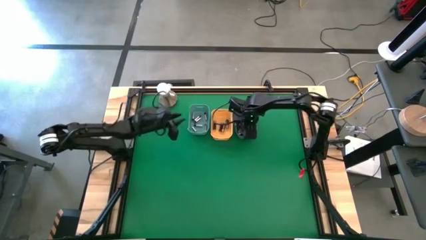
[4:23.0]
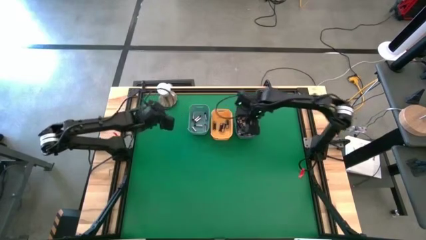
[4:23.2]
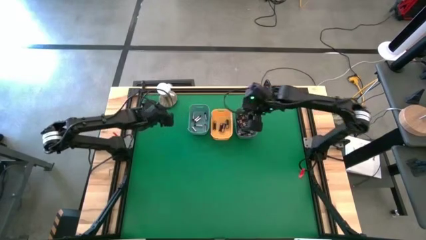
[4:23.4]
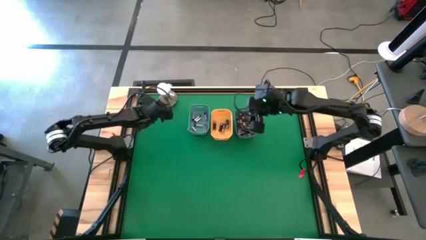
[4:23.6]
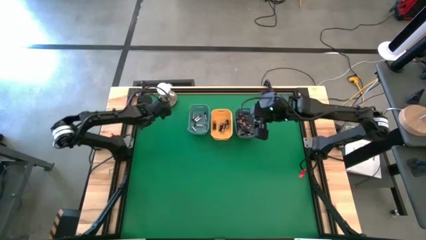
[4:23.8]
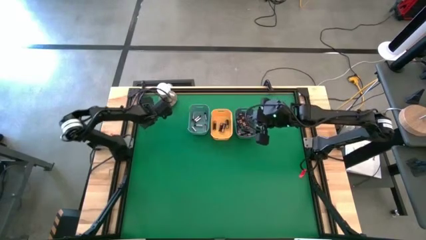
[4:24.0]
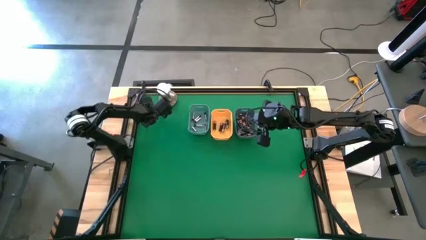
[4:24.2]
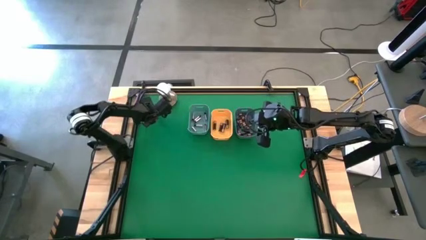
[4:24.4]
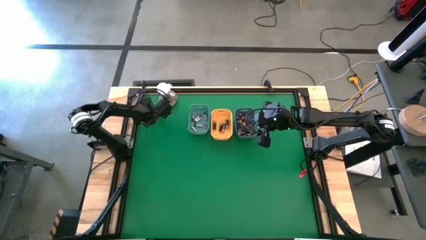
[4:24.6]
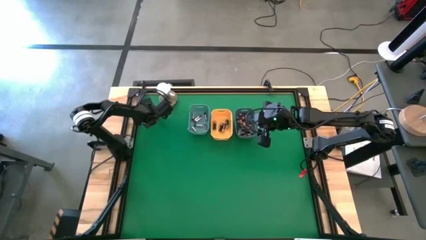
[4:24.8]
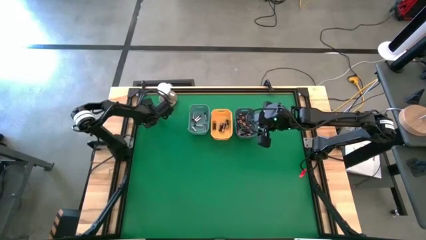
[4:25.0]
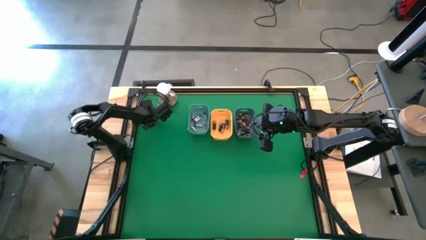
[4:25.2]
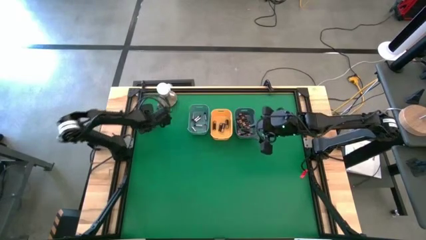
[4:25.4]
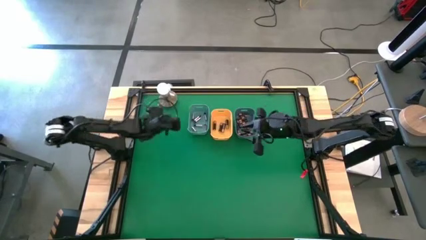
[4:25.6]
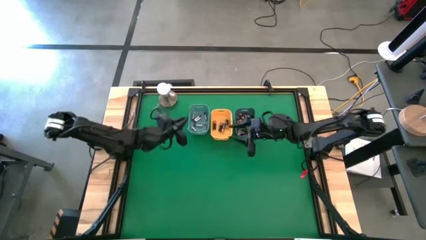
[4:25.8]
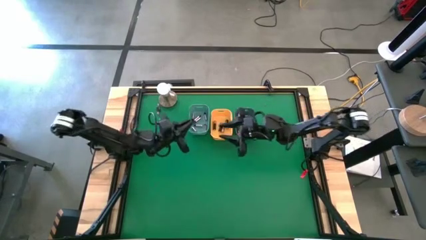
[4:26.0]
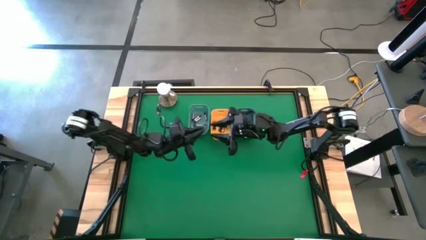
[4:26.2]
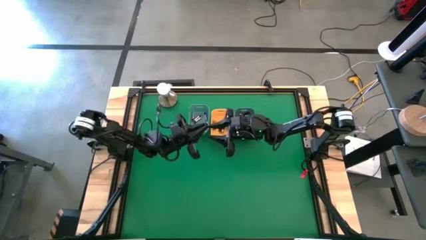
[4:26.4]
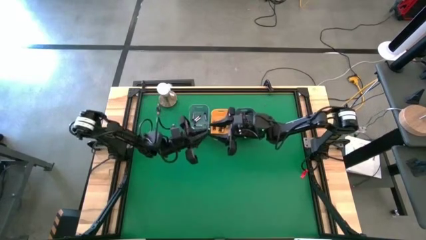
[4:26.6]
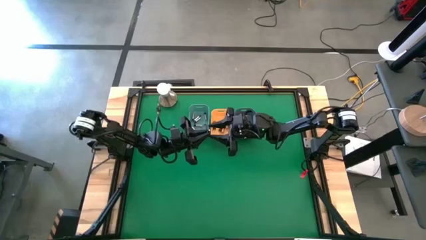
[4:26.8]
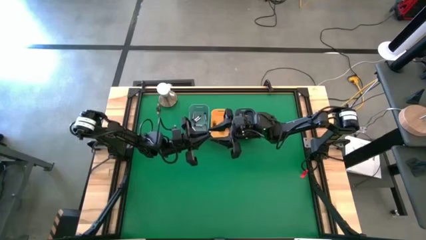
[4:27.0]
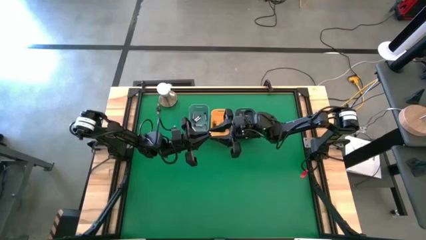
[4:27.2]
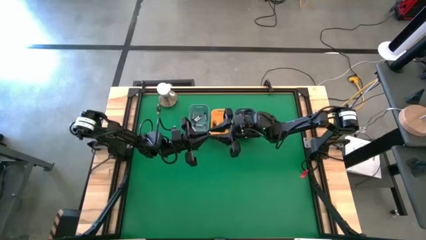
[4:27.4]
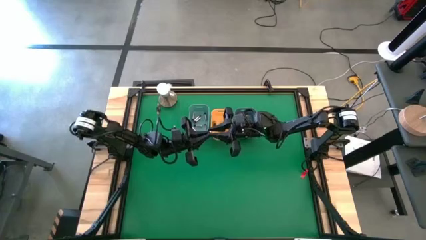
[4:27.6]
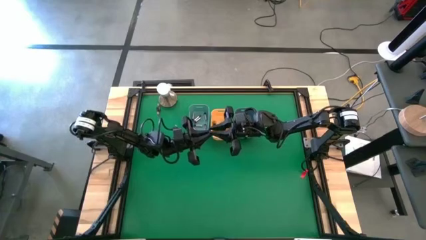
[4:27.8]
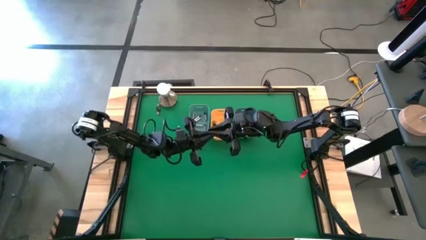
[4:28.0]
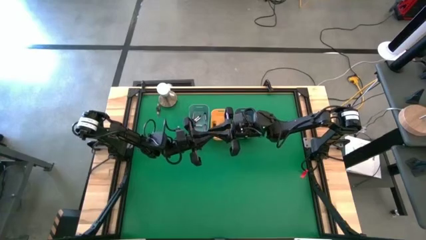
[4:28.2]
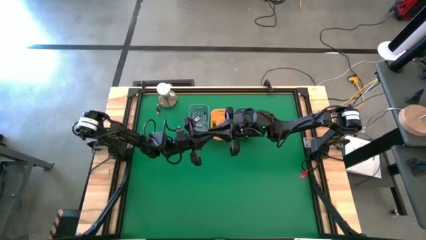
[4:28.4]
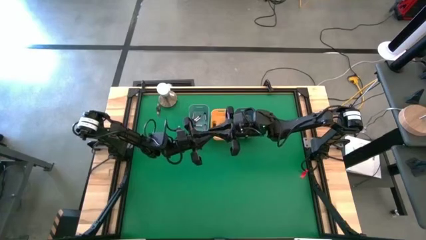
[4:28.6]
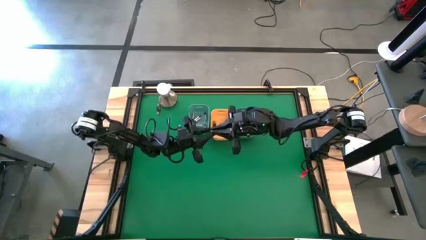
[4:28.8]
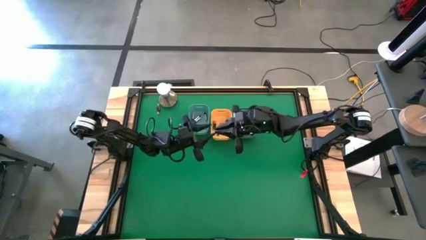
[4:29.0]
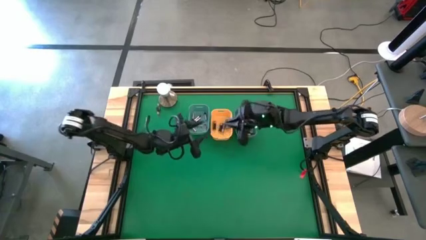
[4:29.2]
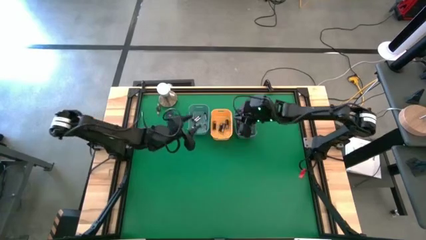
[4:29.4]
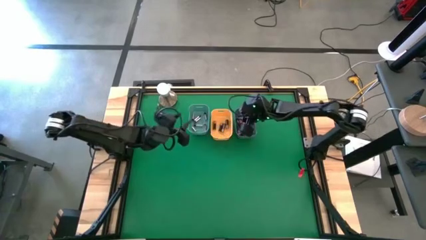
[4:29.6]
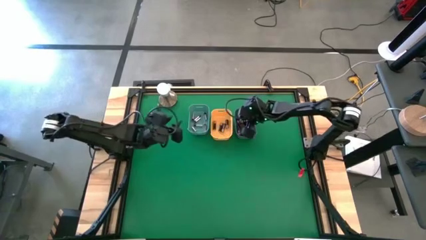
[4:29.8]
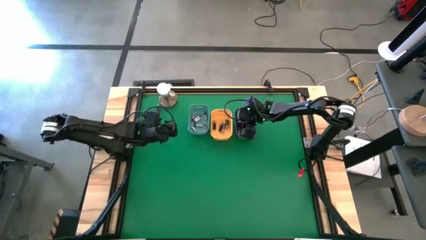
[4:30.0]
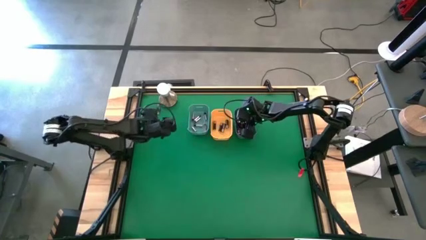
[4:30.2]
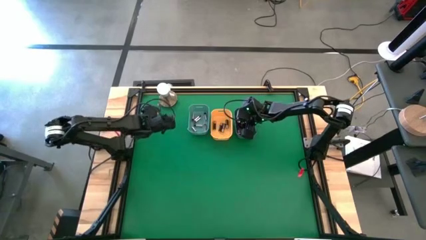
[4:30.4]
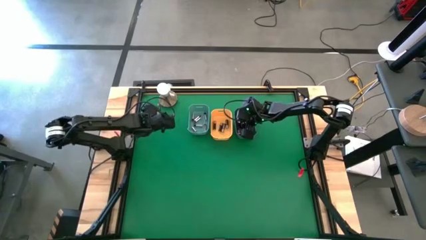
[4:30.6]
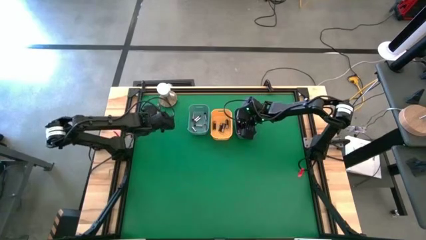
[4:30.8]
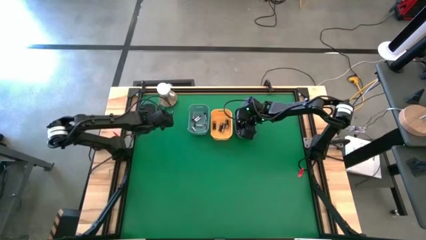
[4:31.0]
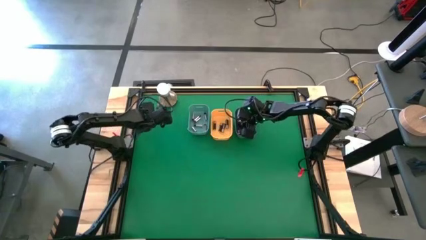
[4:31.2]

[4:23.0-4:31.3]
Task: Sort batteries
Put the small black battery into the blue bin

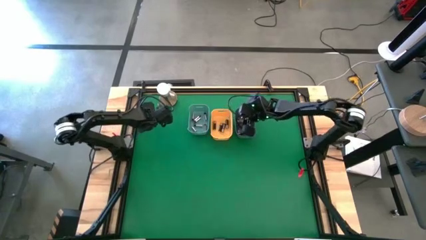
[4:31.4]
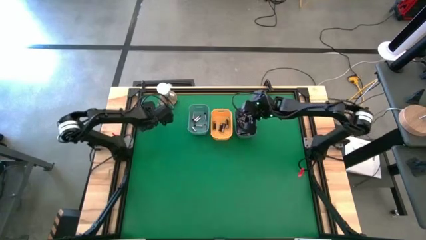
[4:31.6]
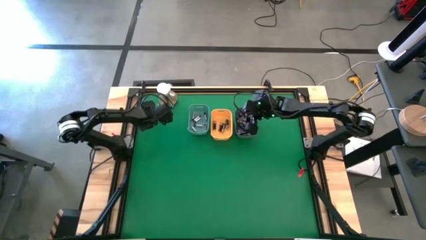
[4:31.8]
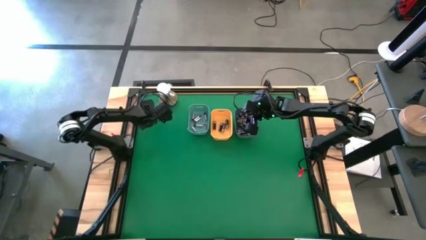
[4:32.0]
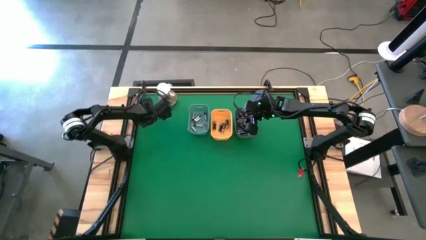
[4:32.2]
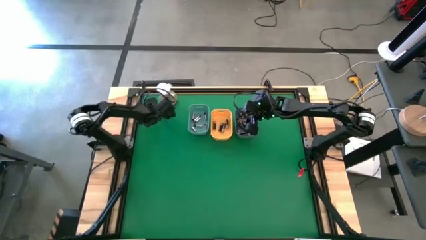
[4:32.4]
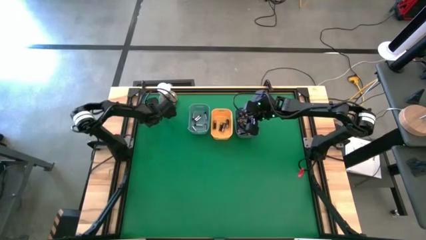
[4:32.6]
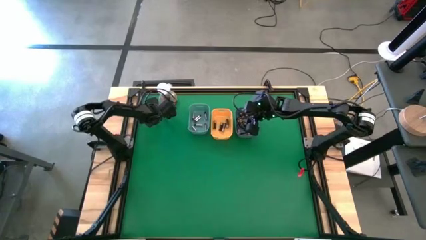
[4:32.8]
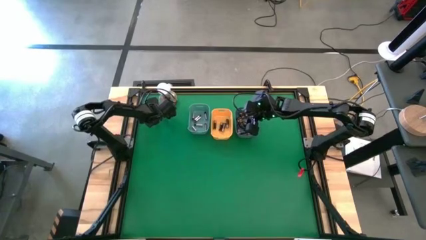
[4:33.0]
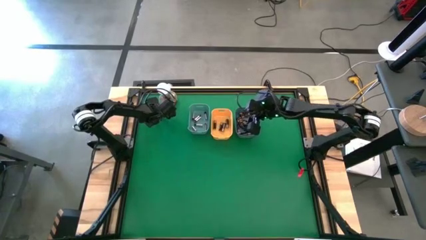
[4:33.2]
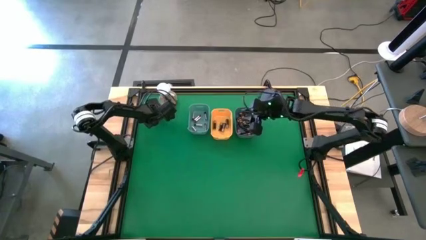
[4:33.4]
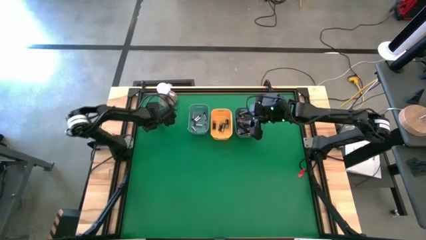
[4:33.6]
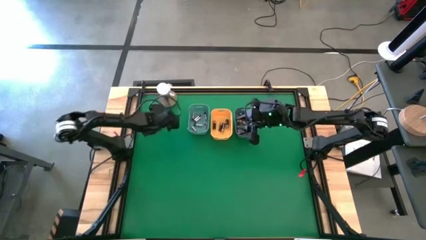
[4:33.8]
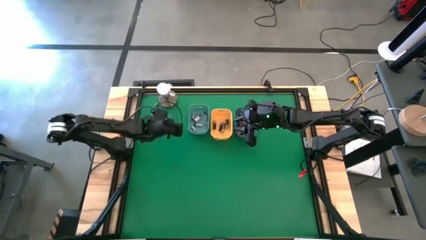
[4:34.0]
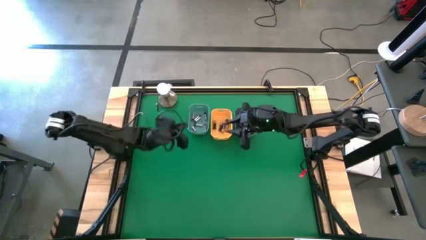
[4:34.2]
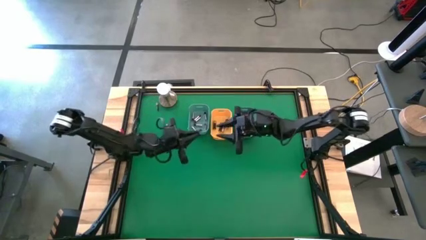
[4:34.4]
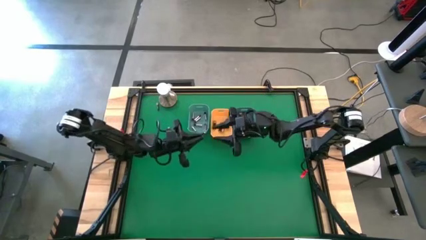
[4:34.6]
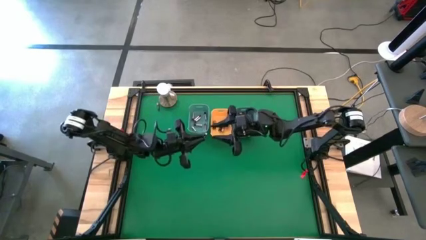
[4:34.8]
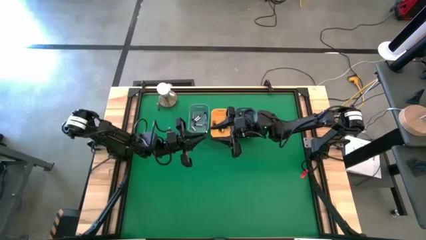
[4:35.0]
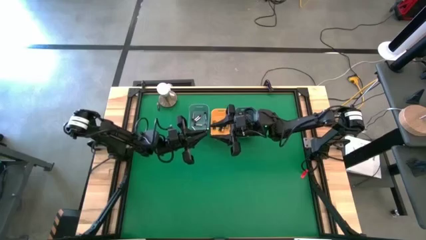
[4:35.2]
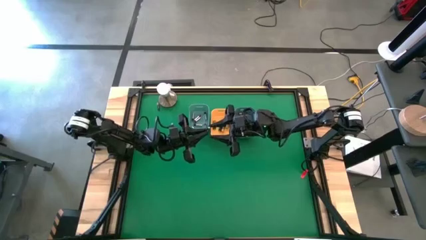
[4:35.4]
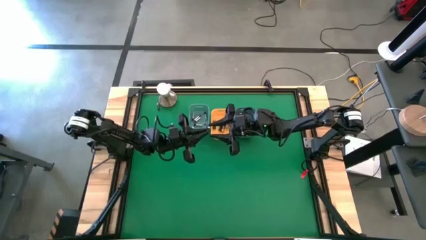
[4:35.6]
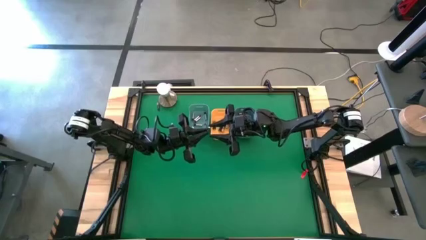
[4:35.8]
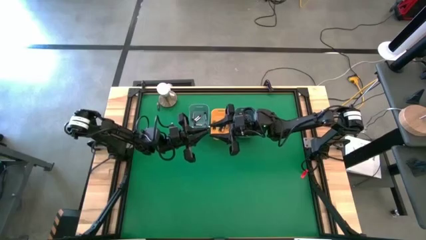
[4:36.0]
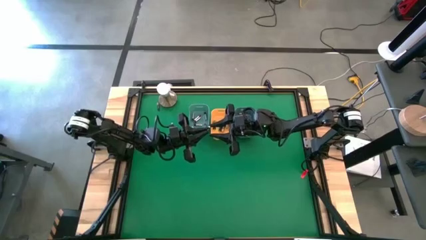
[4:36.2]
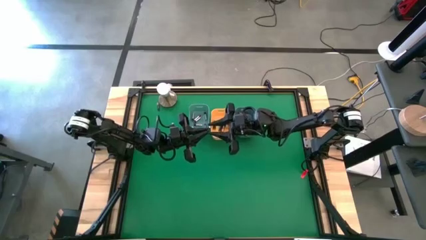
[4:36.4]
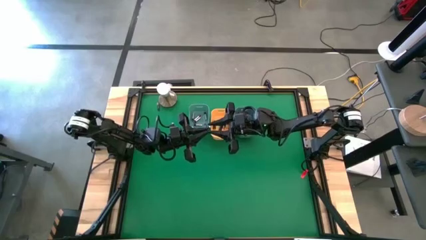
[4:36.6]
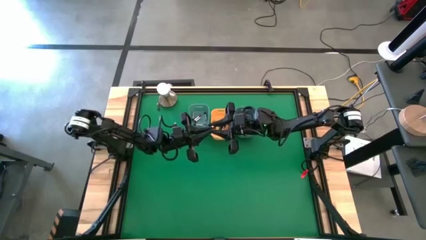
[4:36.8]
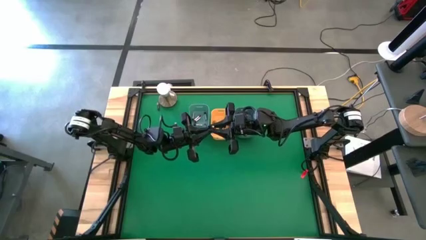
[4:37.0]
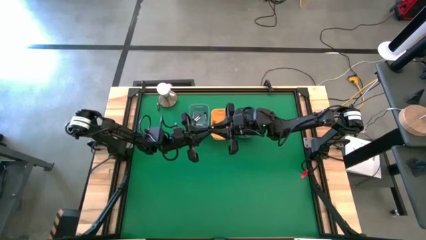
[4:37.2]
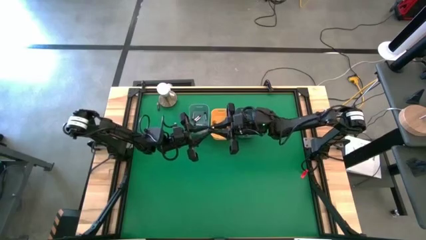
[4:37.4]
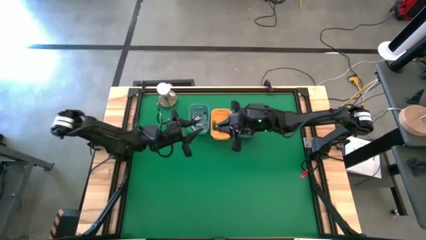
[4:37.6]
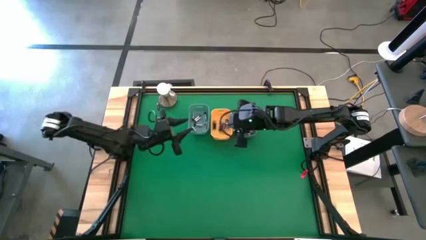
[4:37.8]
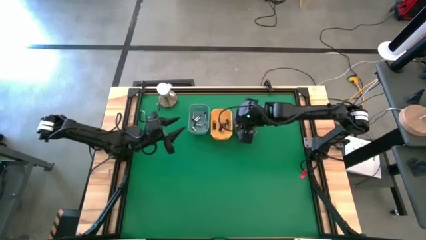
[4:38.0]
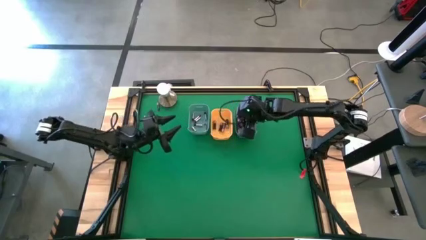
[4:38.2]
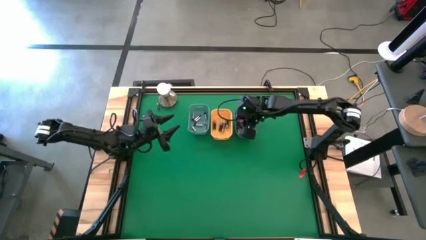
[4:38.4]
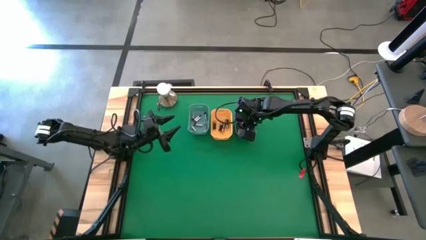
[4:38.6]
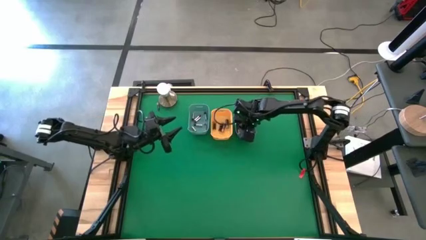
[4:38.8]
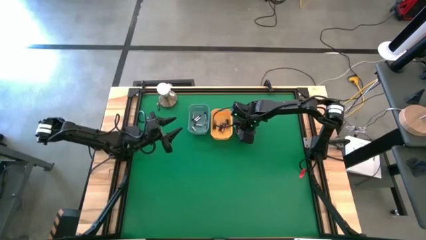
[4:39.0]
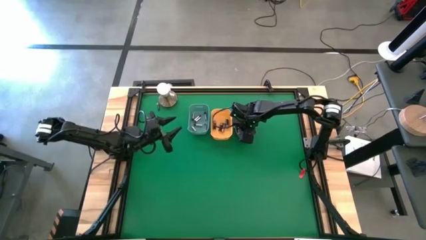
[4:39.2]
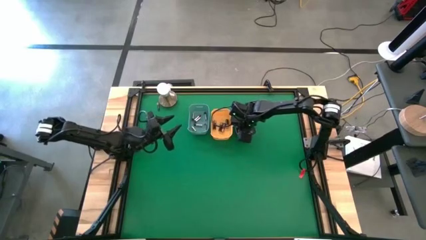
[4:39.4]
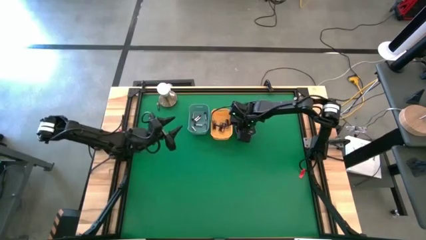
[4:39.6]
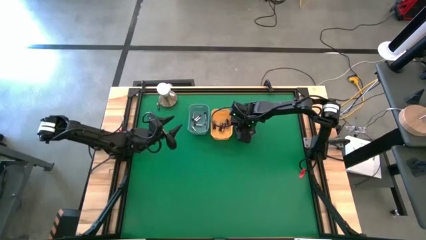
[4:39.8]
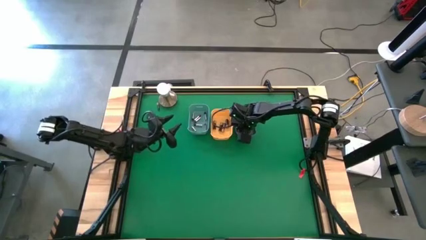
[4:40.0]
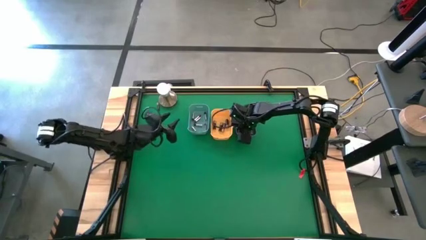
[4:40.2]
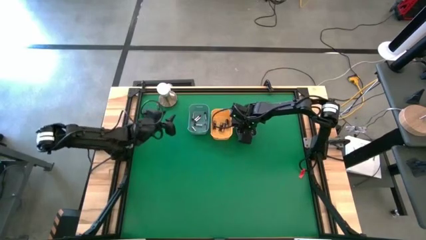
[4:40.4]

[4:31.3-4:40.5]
Put the small black battery into the blue bin
